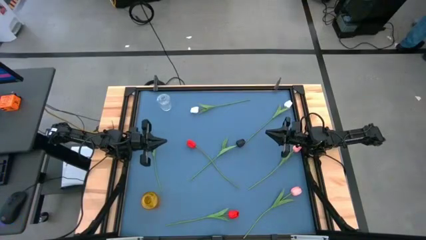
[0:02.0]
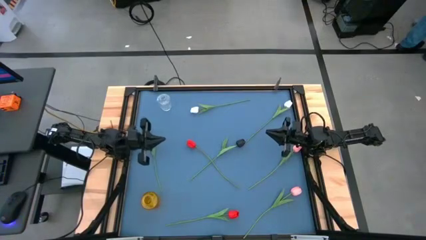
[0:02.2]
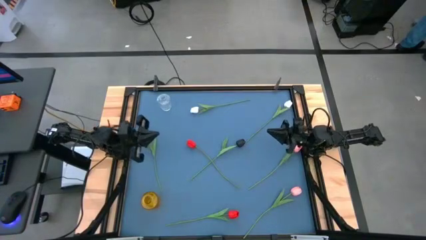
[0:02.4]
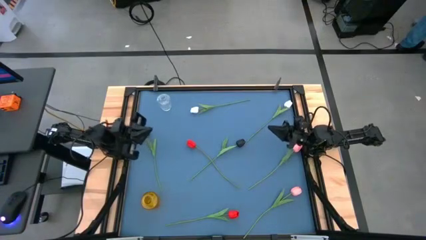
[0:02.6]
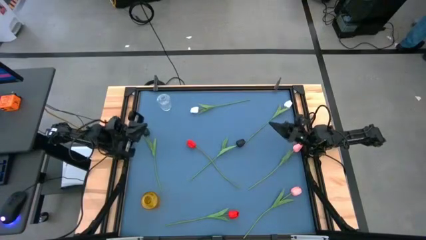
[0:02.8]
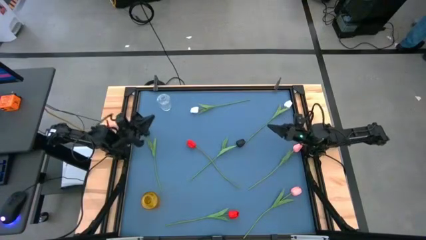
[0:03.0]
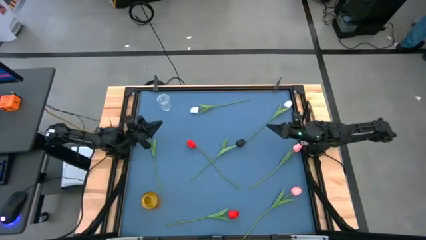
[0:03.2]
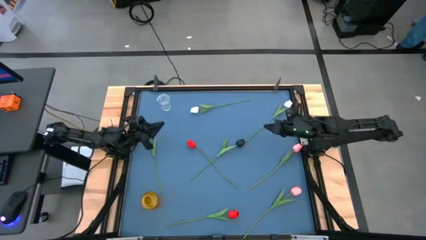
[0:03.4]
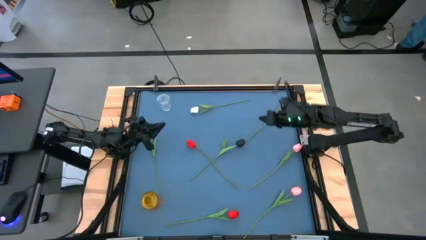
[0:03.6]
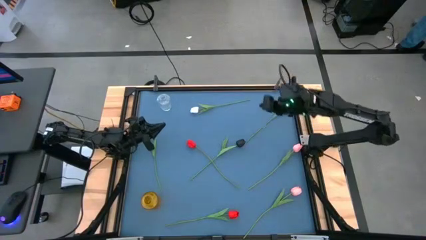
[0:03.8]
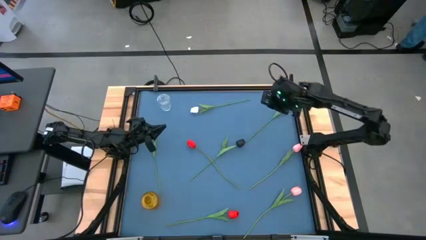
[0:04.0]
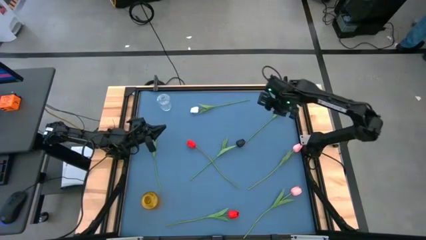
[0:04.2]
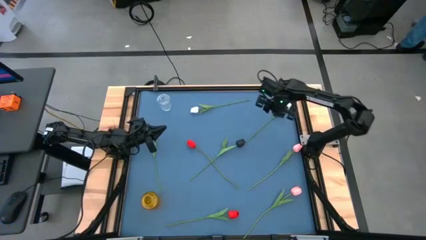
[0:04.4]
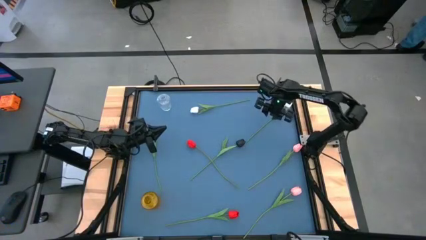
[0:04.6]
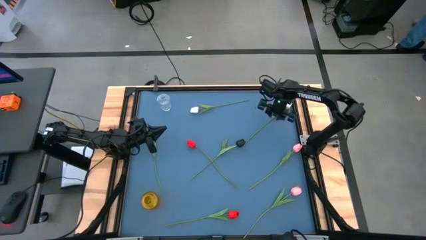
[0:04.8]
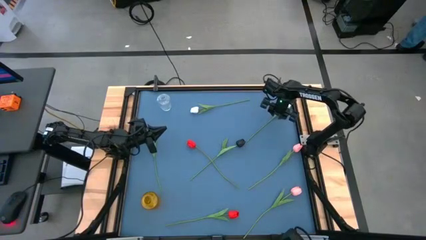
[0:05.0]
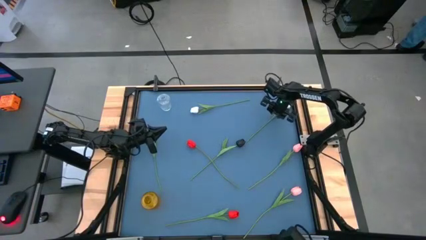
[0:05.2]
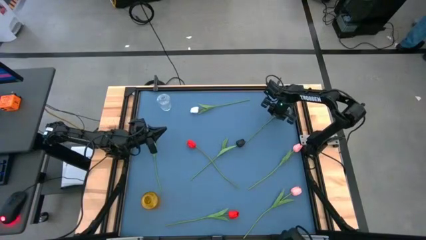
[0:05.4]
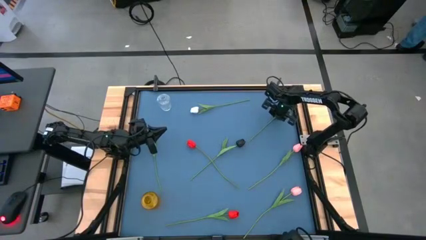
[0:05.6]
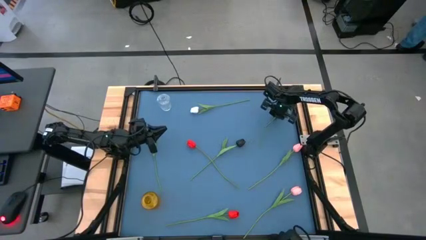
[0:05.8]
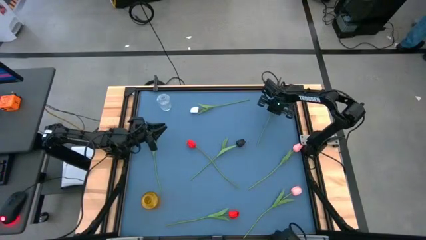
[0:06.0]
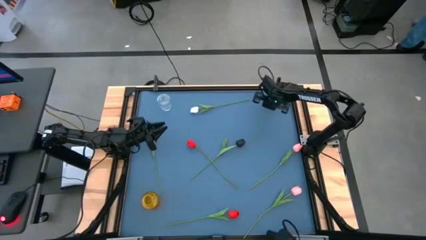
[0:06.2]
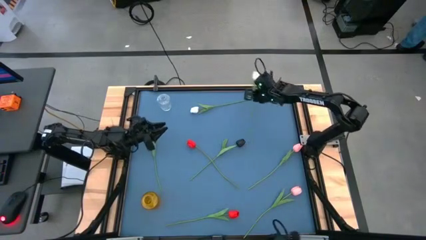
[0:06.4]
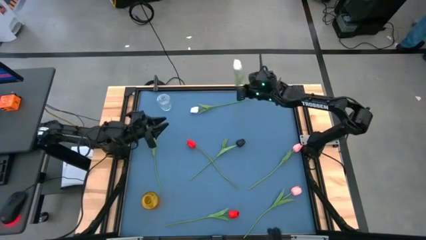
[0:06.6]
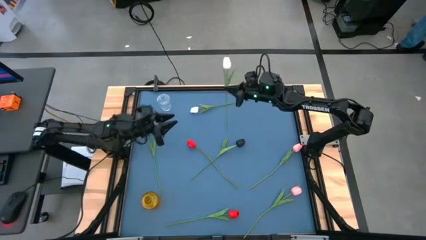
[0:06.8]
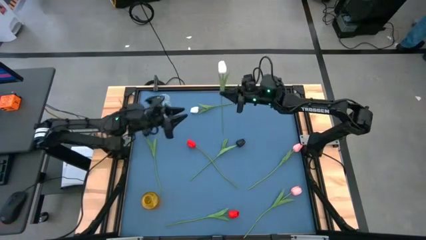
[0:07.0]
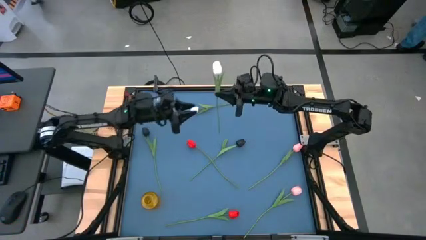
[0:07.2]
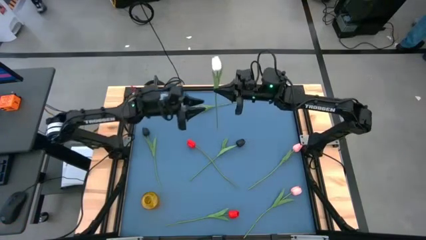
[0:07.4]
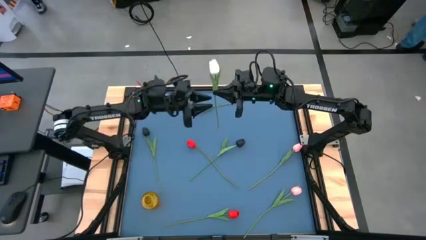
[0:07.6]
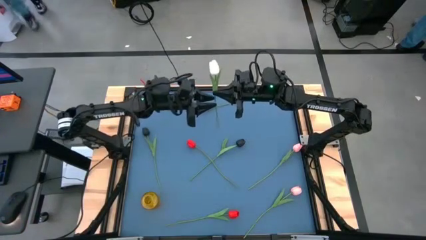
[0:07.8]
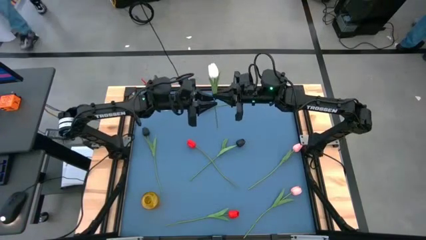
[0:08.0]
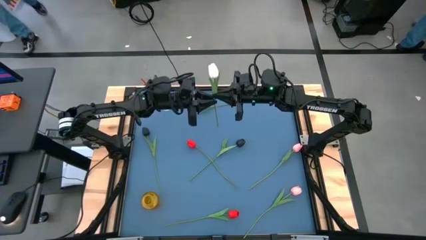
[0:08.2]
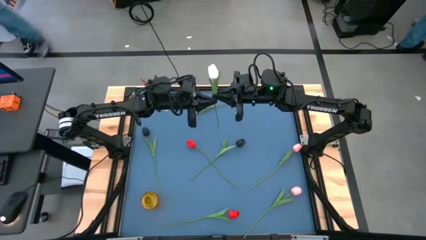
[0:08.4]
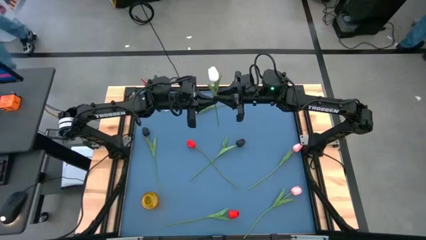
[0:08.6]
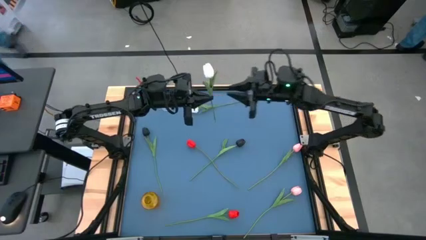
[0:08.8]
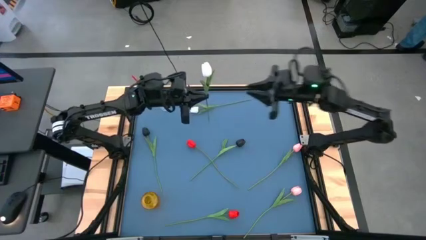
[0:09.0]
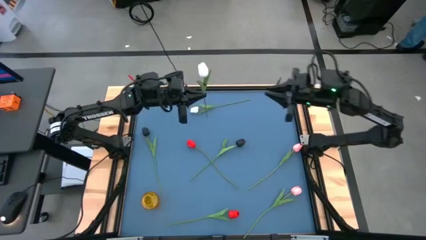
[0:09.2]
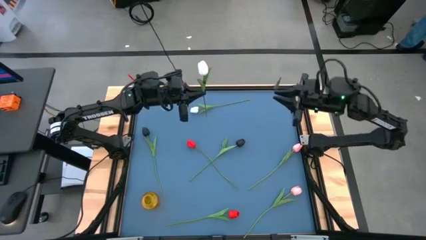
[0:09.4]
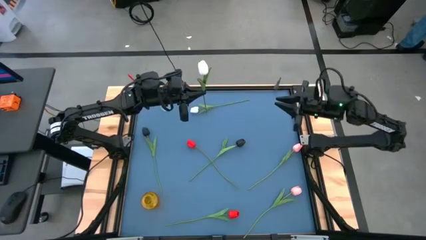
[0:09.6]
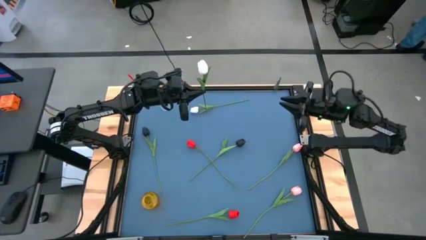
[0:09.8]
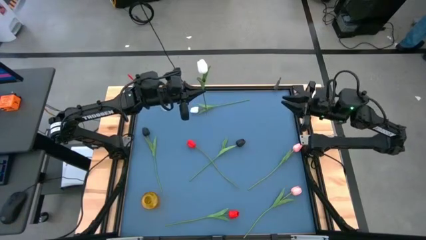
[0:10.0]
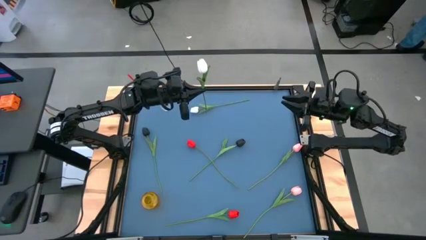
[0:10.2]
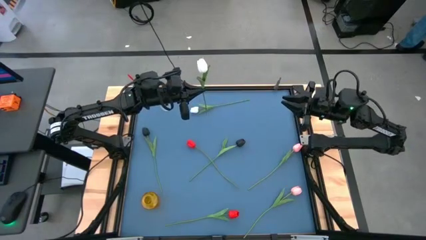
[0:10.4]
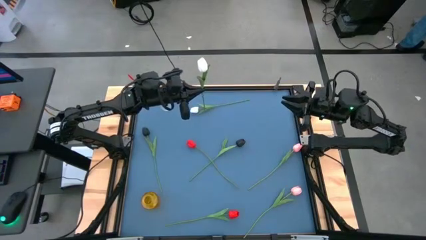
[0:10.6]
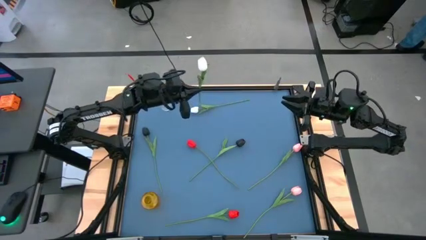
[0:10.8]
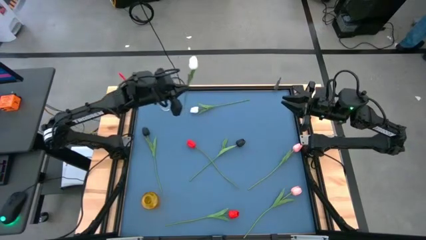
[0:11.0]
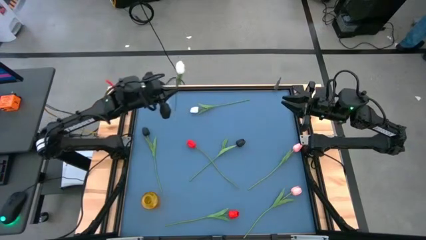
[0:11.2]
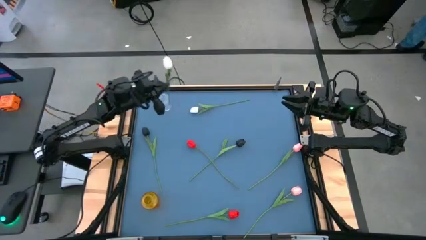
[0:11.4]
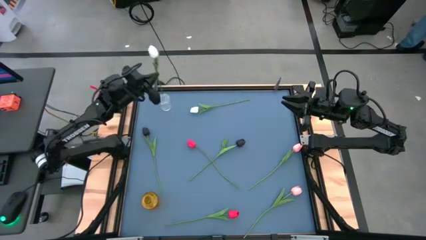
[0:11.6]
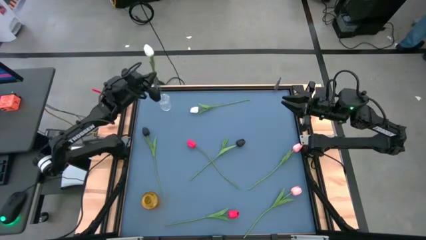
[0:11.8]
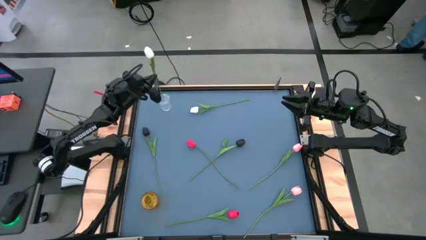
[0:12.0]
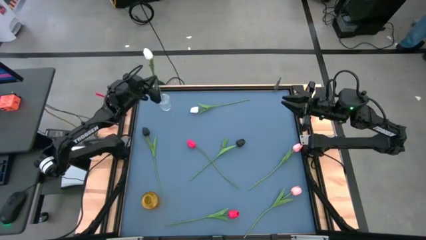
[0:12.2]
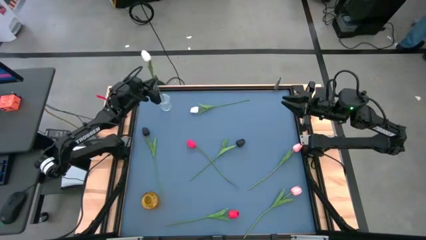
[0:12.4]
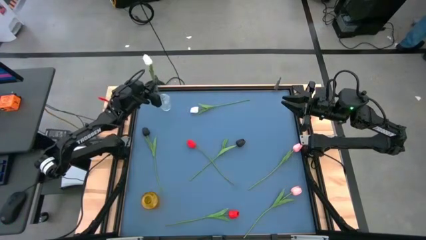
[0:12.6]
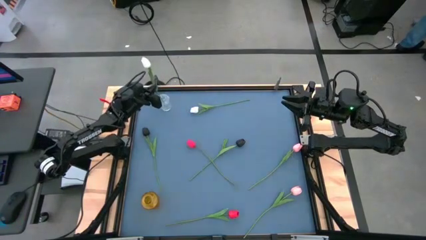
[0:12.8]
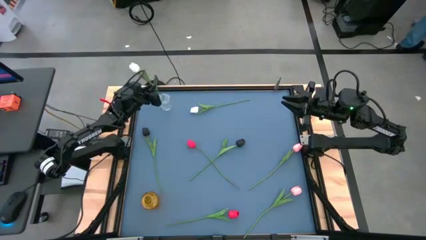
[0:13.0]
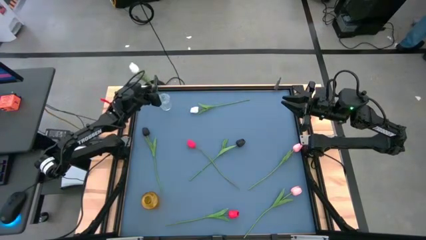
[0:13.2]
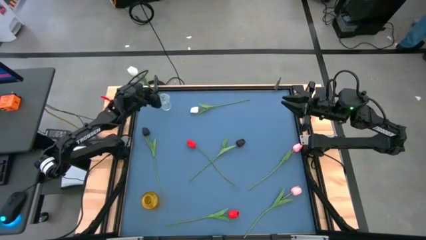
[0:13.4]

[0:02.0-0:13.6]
Task: Sort flowers into vase by color
Put the right white tulip into the transparent flower vase

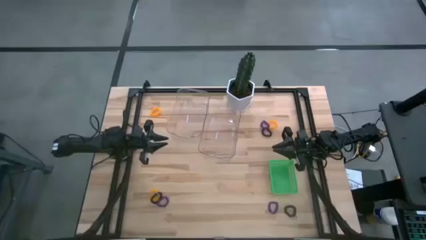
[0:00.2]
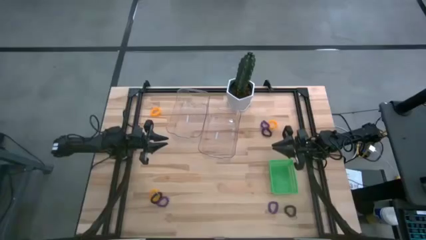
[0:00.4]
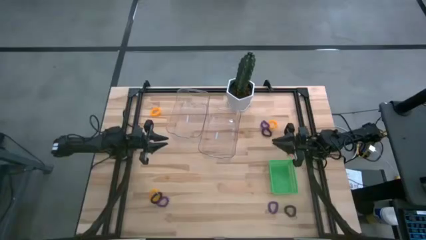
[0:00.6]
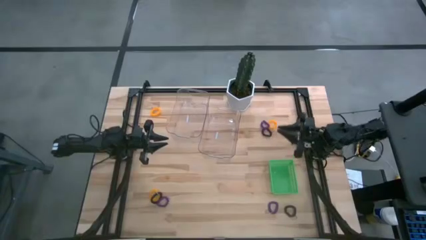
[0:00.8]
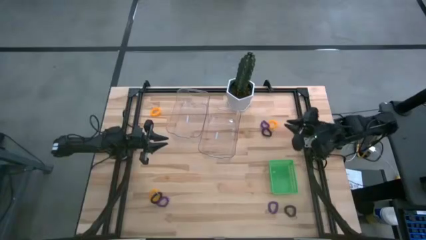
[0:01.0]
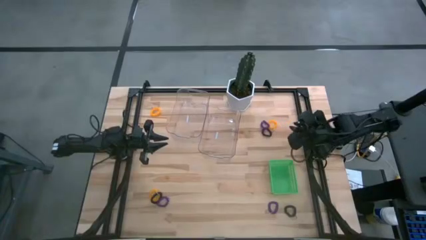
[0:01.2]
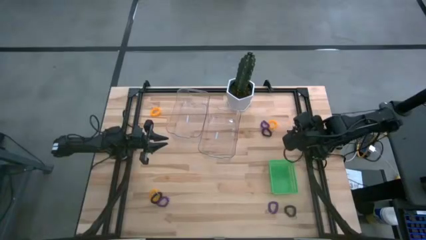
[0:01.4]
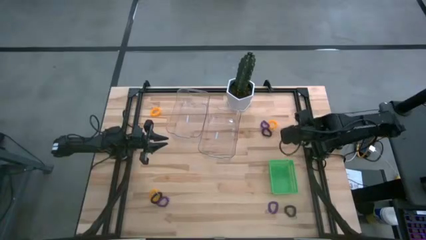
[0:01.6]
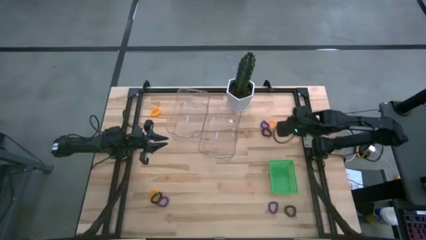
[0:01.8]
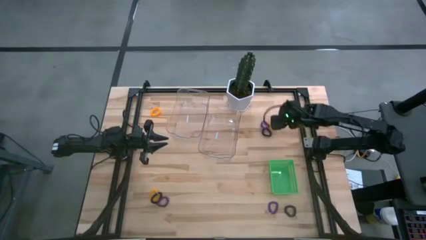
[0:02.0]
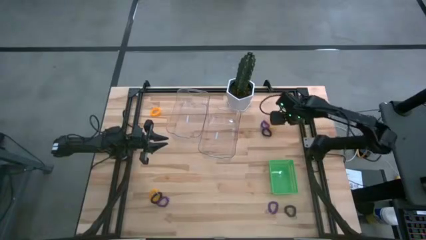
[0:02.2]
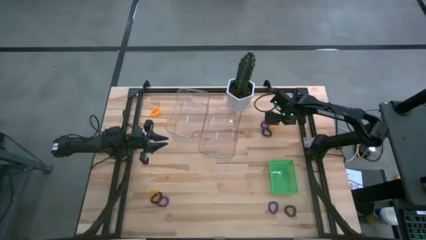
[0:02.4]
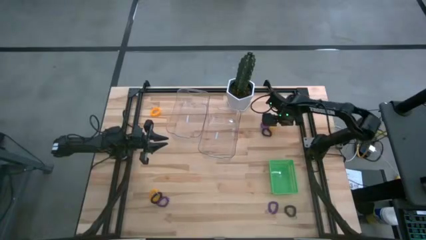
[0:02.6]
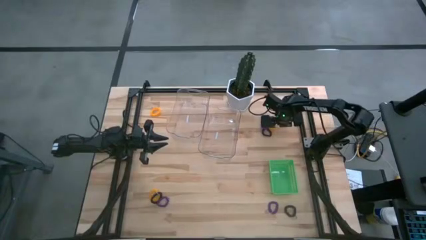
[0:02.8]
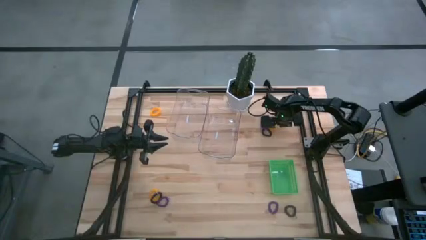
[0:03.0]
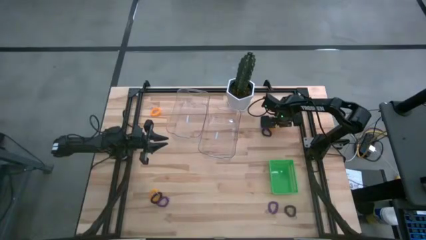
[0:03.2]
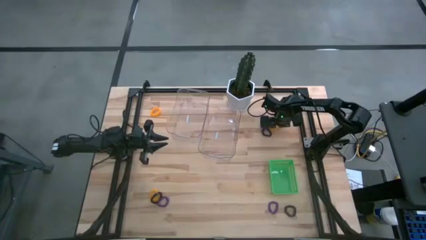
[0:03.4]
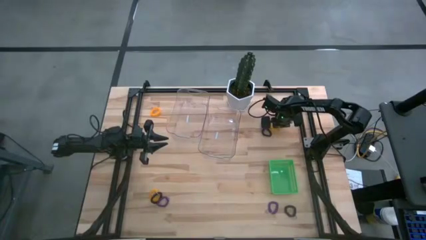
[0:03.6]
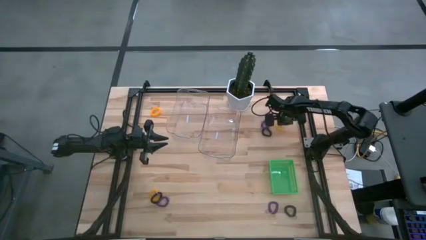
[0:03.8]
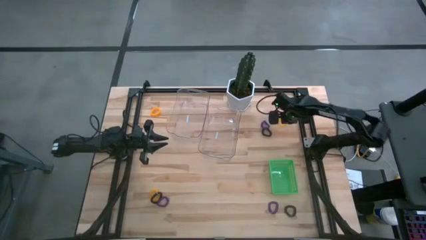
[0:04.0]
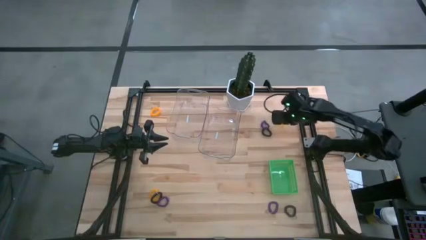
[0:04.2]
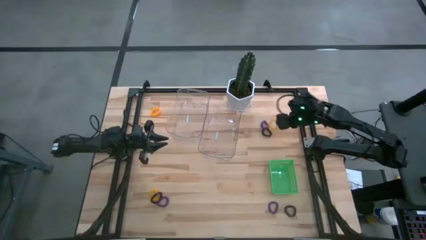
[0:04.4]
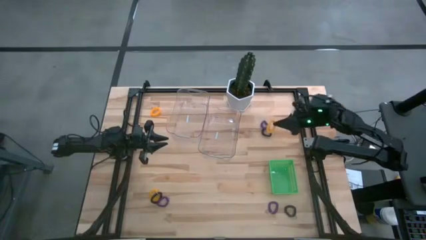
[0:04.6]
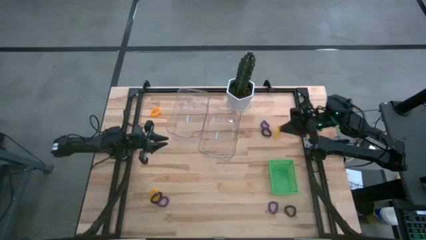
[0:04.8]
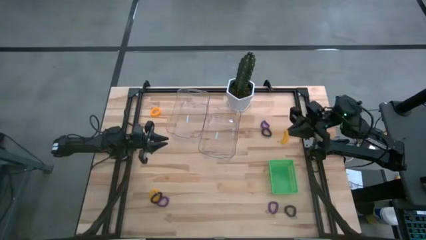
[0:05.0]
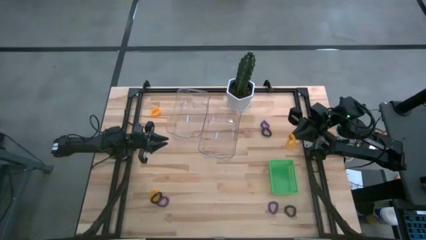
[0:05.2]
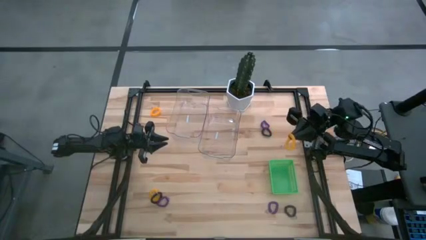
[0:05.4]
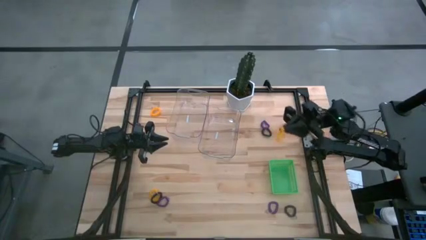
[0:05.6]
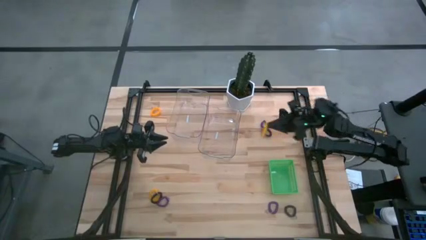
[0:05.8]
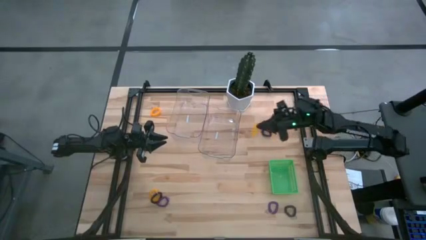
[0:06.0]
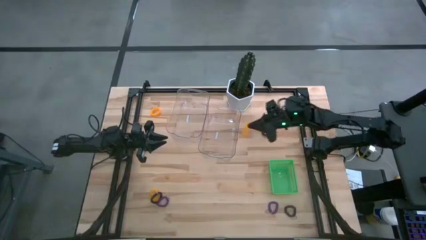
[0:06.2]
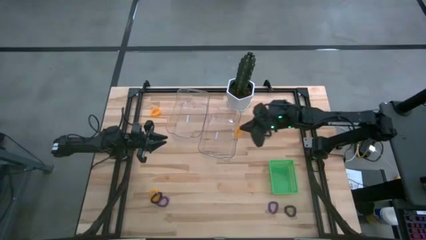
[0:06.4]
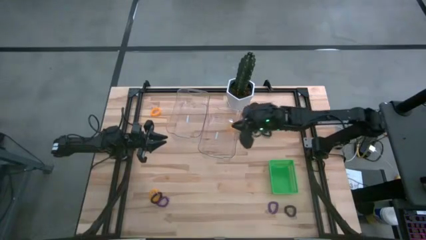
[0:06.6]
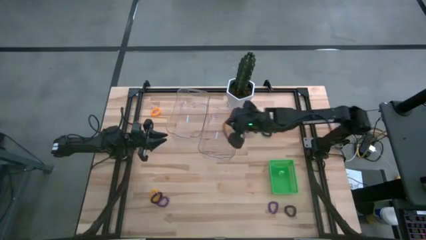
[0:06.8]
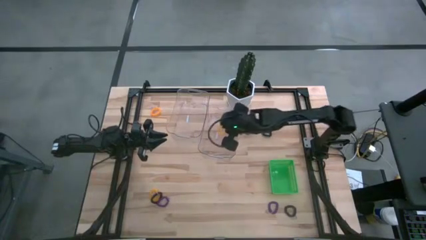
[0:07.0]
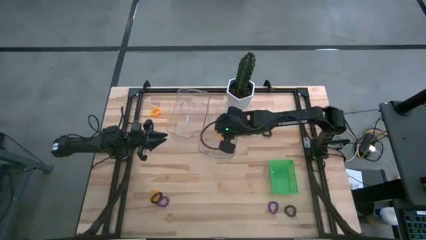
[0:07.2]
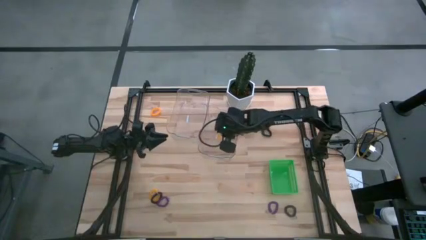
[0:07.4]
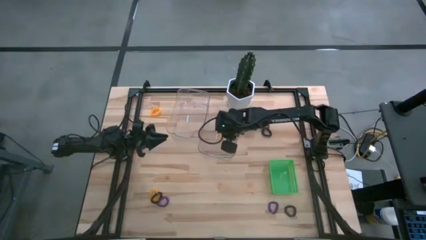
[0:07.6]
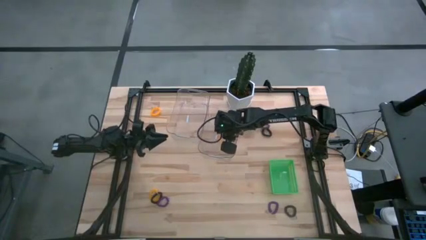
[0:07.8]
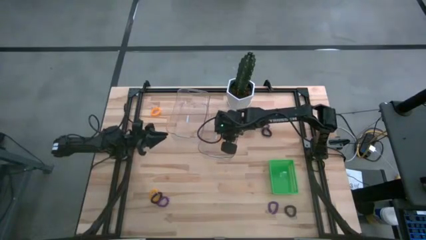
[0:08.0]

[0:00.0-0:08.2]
Task: Sort spring keychains
Put the top right yellow spring keychain into the right transparent bin
